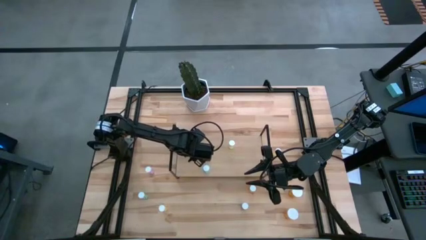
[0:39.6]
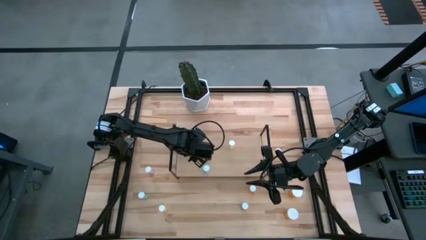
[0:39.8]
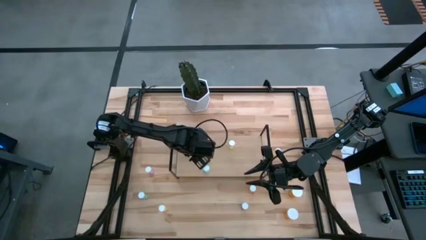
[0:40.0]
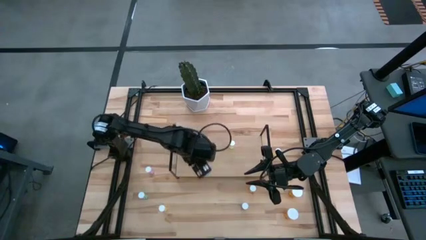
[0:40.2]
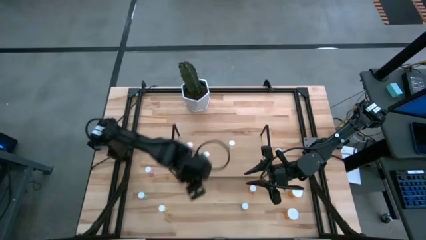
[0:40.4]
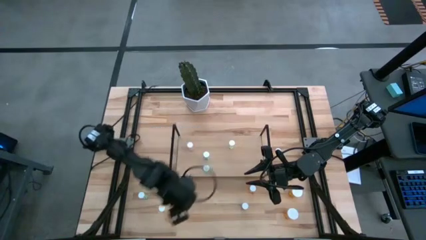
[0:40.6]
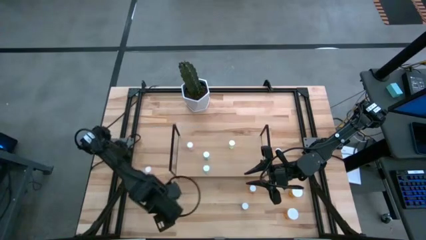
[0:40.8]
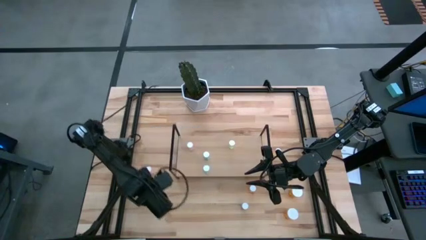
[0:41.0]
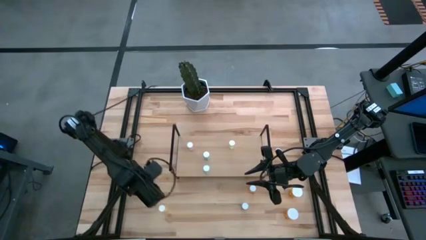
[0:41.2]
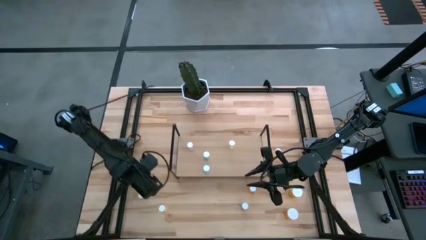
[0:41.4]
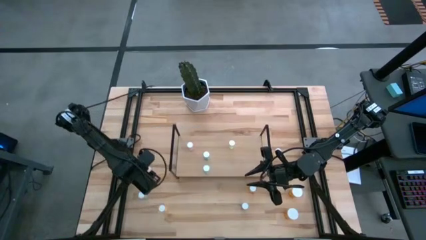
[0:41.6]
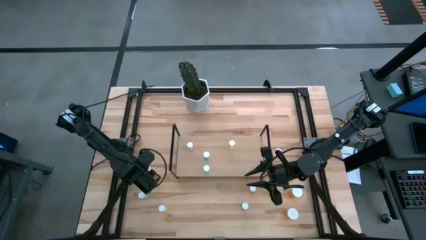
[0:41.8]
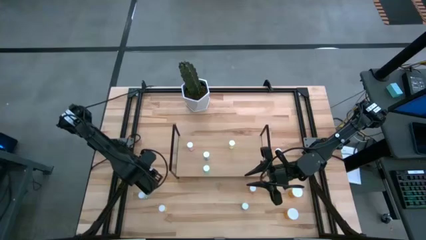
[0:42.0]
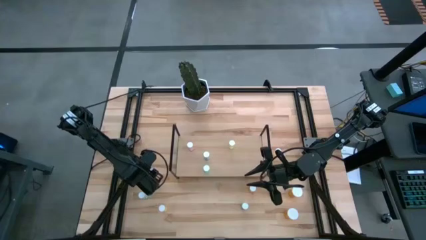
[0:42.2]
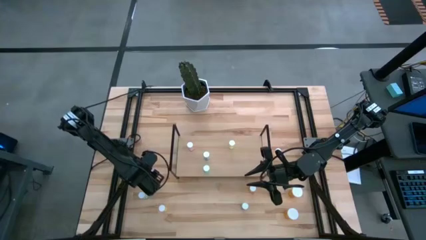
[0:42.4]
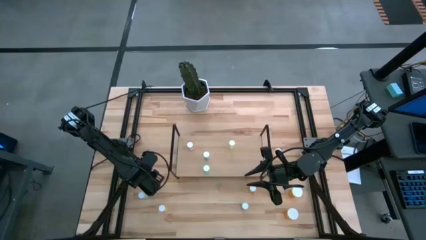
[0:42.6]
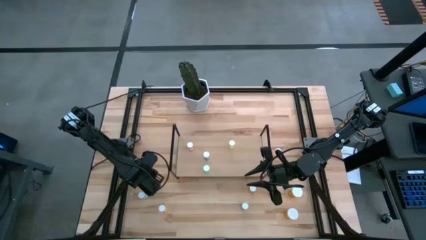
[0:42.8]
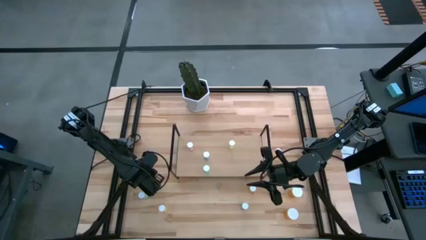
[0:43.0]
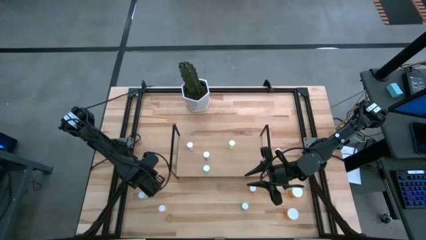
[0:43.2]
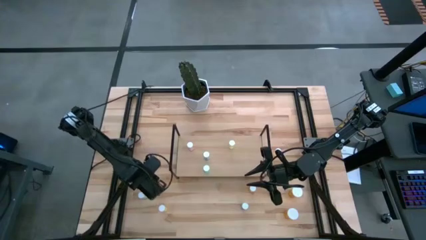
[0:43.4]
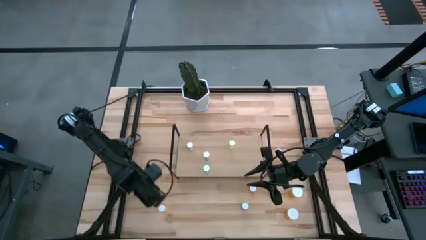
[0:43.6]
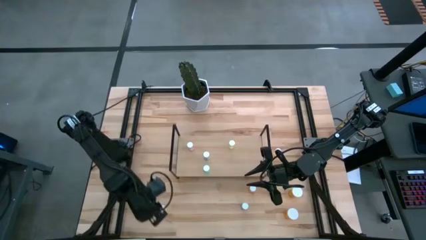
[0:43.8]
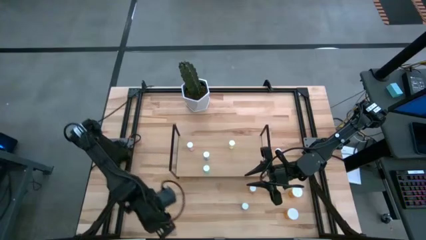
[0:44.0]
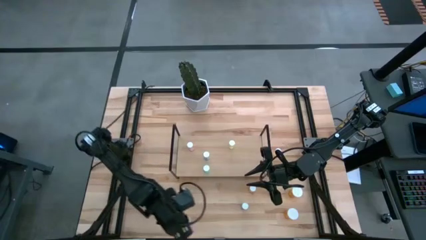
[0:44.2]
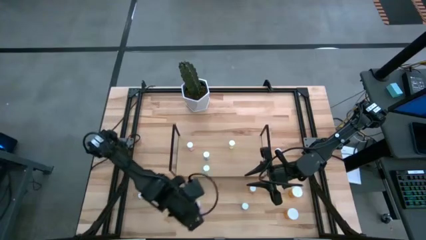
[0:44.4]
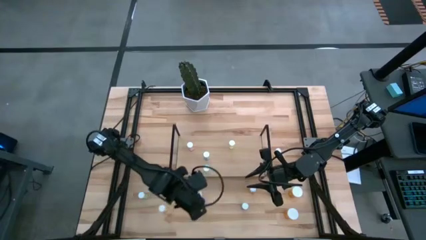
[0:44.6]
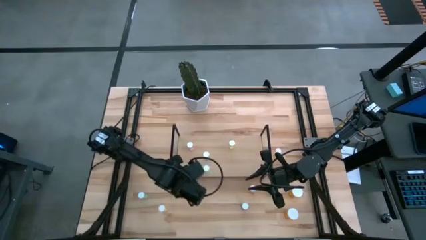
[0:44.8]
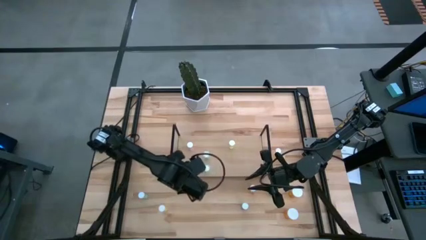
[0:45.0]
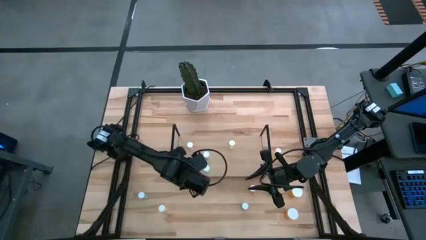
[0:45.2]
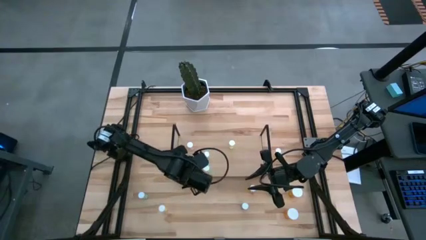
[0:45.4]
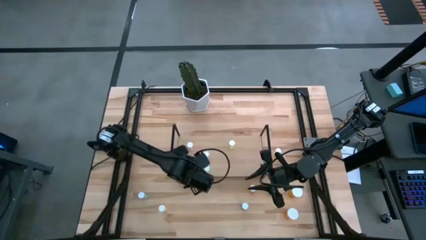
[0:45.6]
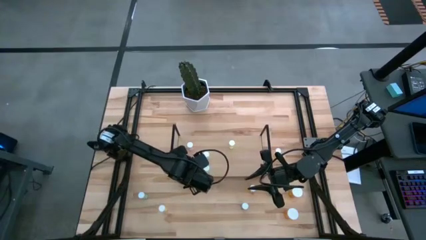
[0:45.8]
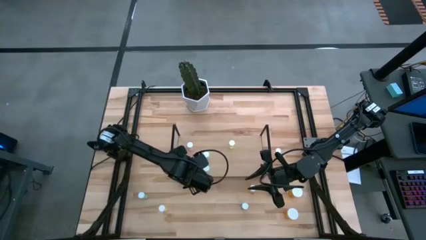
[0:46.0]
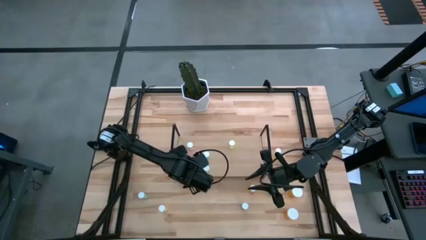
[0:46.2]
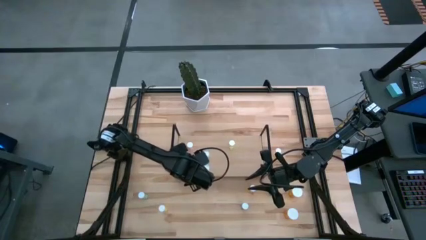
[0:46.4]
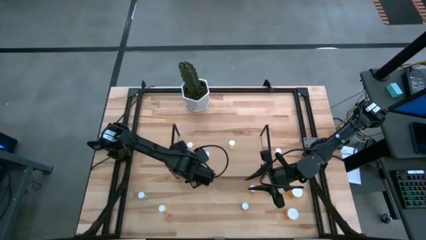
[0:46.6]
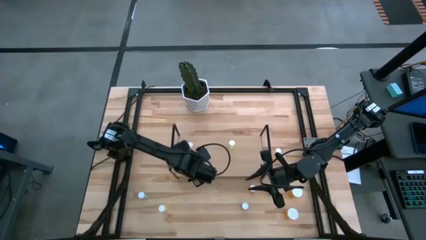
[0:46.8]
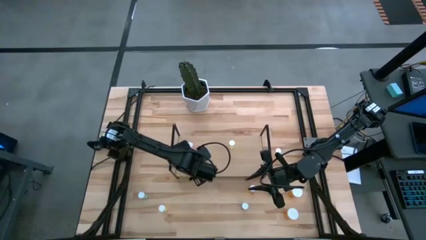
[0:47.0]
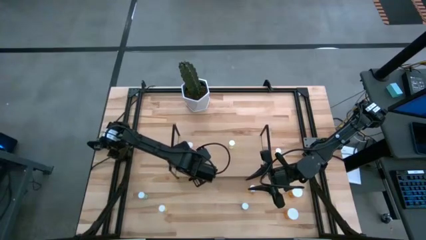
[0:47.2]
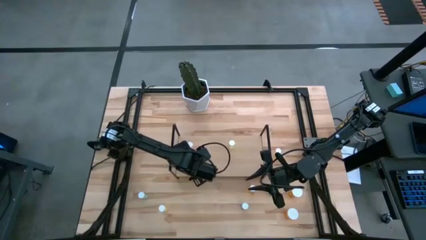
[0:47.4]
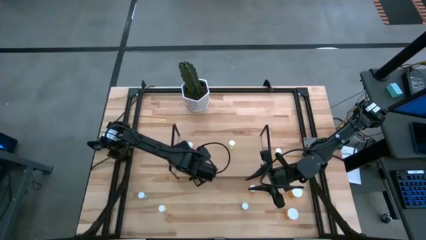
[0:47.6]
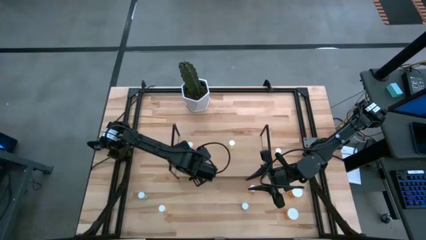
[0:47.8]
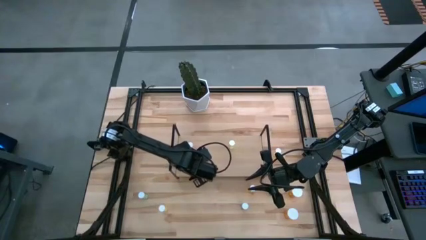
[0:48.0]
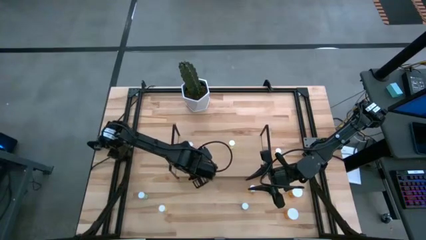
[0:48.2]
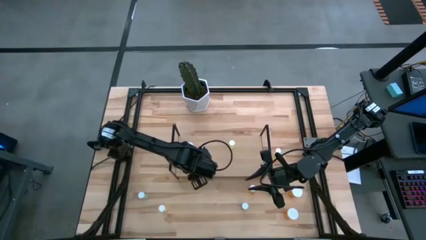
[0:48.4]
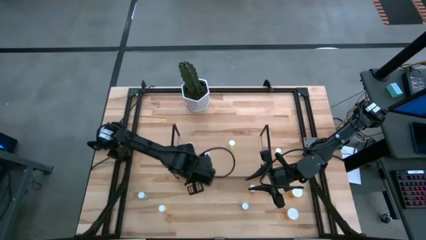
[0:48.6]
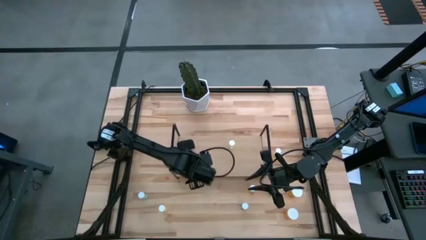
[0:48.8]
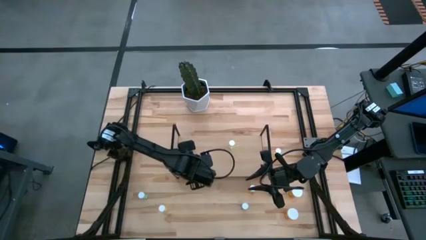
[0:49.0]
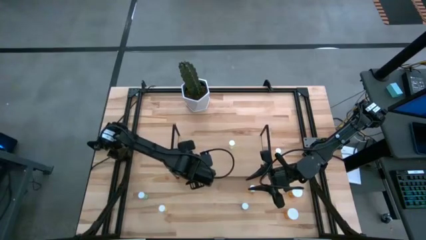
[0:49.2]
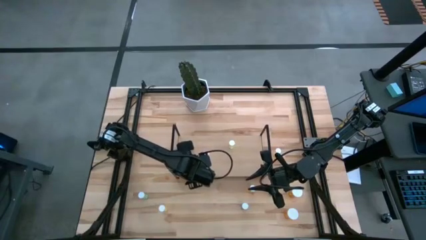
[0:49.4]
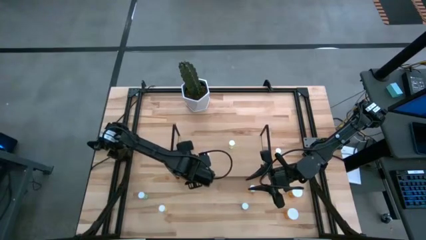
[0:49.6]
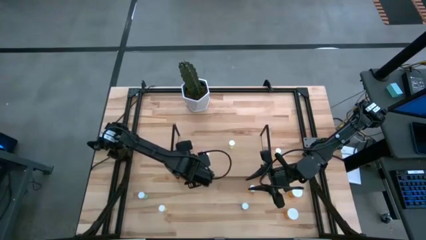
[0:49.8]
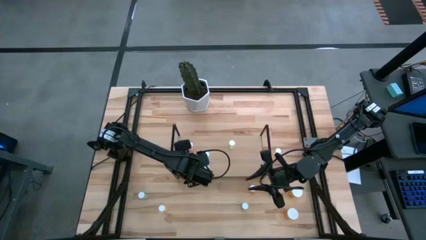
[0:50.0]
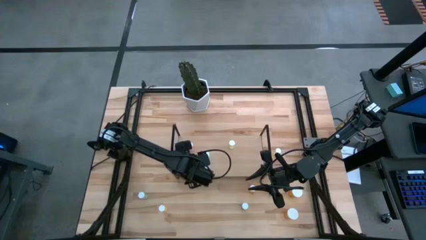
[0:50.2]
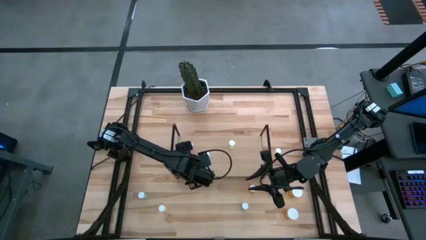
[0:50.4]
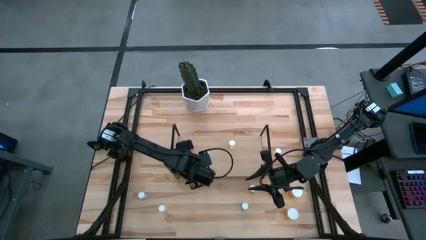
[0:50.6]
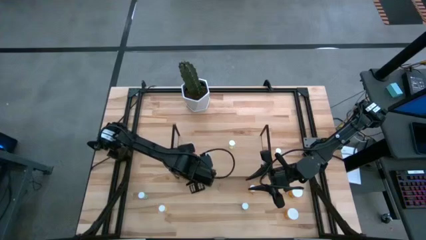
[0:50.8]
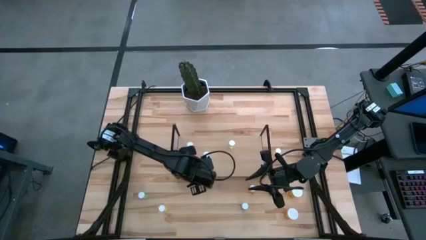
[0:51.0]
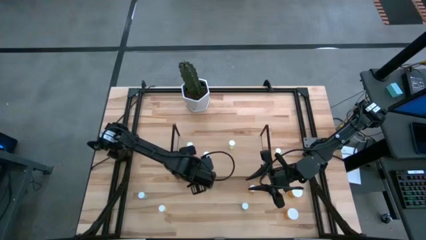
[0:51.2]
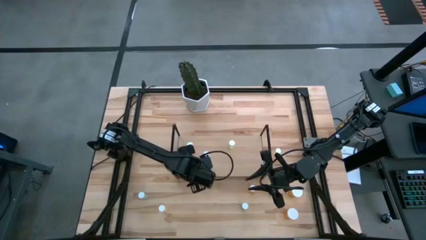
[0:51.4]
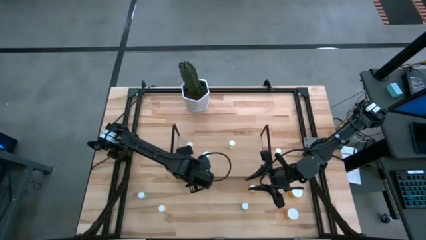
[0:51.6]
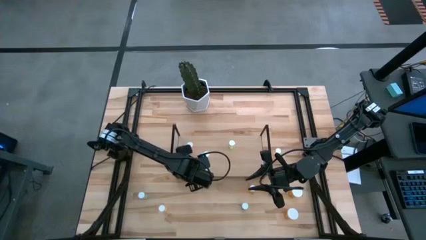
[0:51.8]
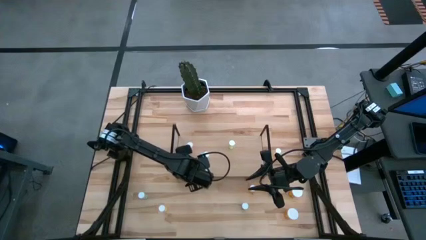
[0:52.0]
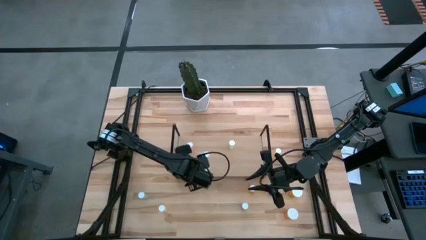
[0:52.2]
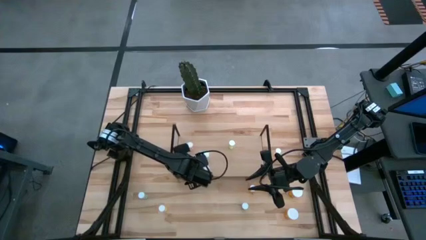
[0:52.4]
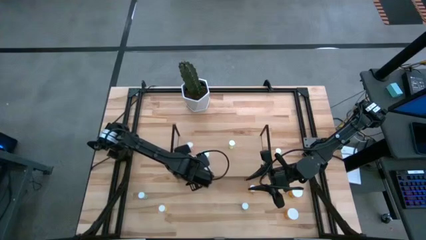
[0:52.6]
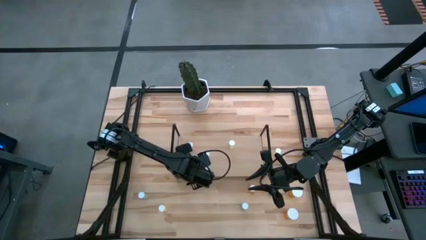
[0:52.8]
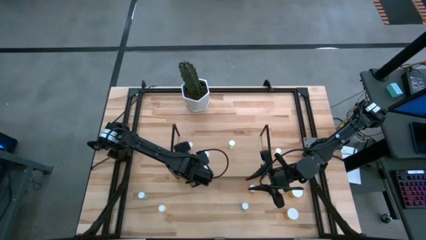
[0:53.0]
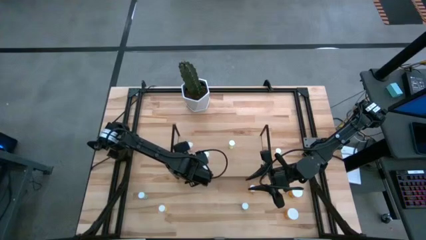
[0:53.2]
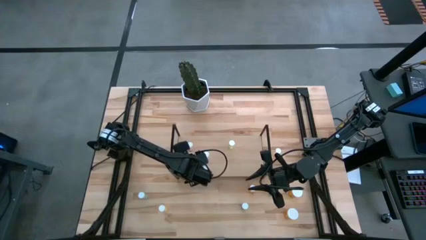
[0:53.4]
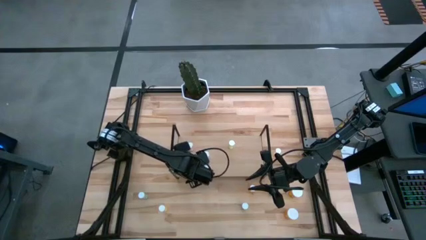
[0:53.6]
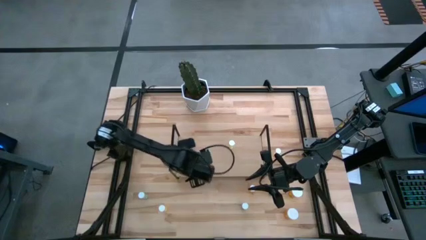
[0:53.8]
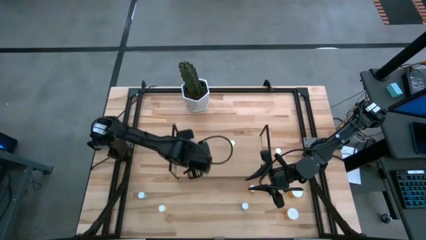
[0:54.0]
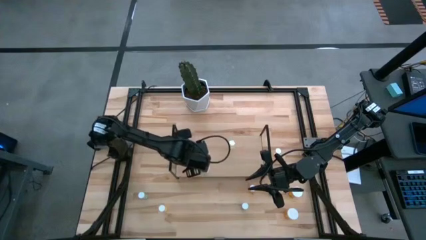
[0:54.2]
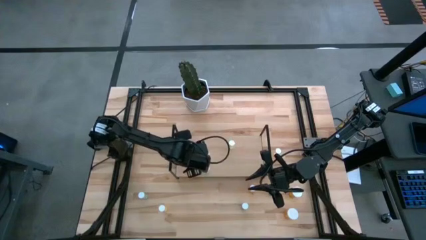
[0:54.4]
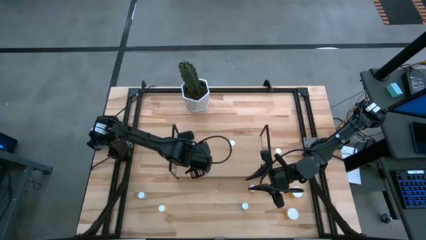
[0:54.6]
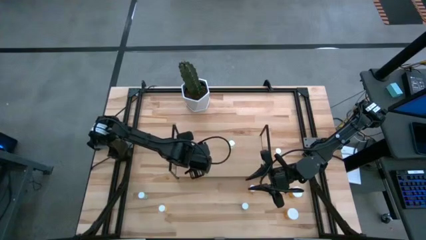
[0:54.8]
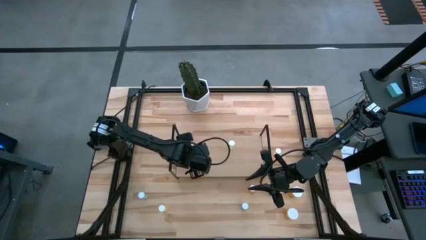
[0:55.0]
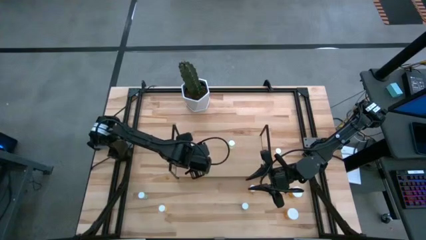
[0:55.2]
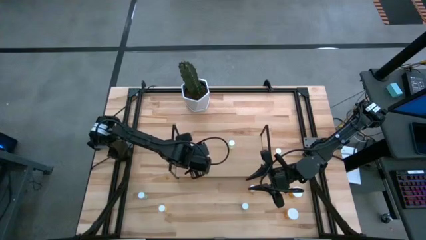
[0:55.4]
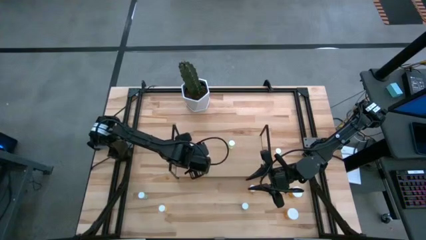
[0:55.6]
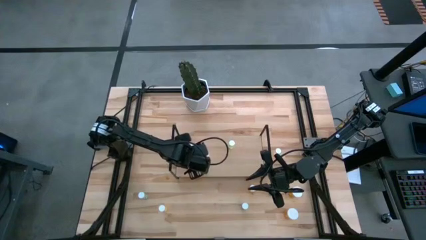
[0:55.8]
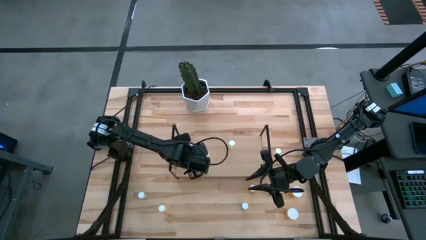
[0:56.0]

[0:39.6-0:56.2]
Task: Pick and place medicine bottles onto shelf by color
Put the pink pill bottle on the shelf aligned with the other pink pill bottle
